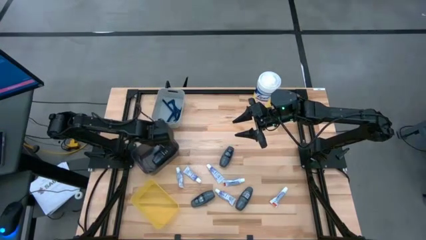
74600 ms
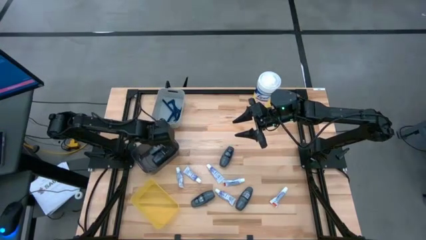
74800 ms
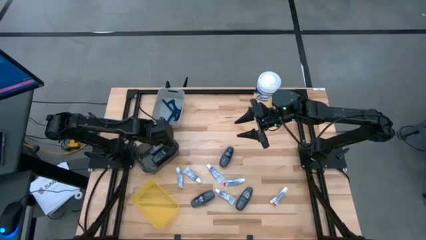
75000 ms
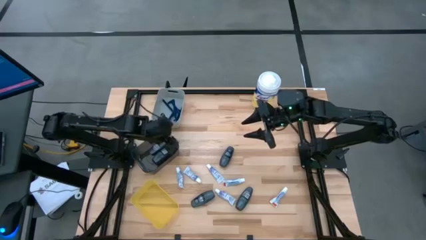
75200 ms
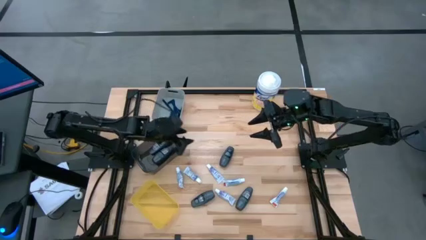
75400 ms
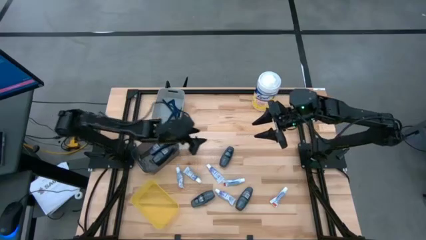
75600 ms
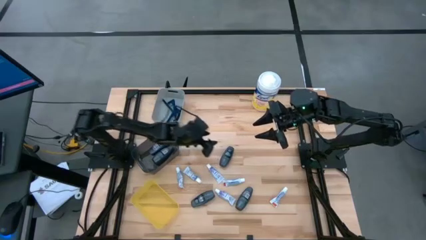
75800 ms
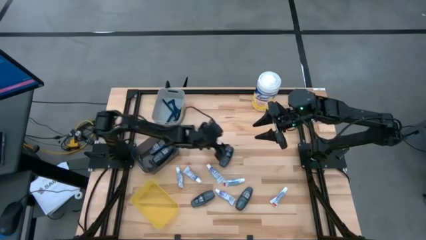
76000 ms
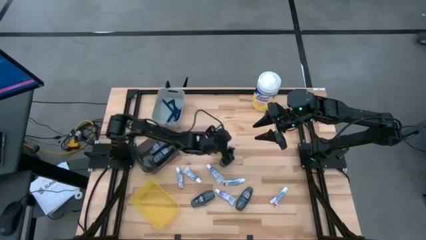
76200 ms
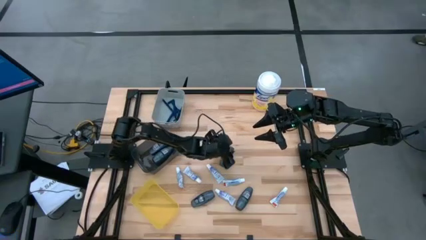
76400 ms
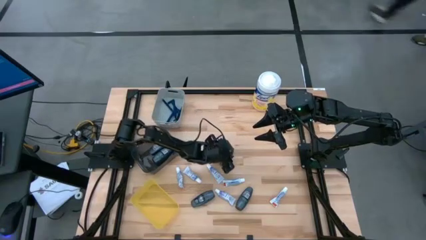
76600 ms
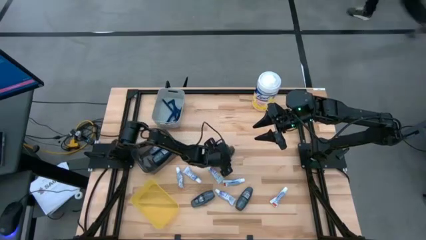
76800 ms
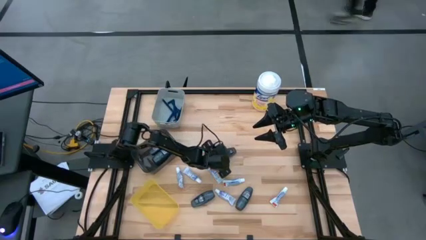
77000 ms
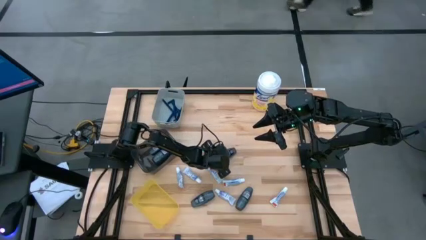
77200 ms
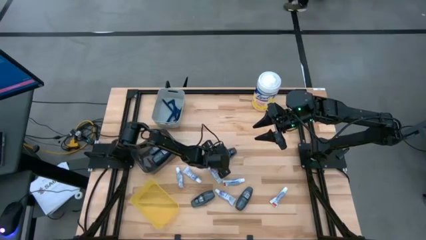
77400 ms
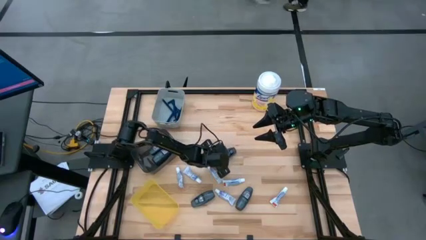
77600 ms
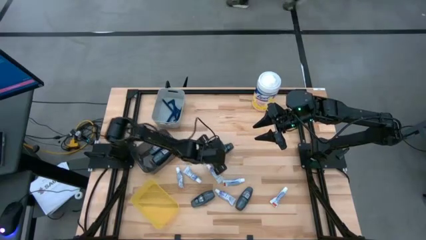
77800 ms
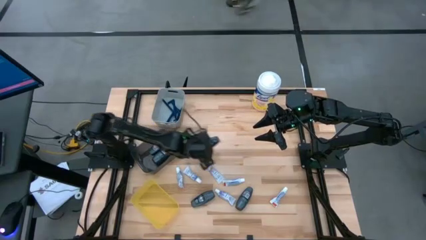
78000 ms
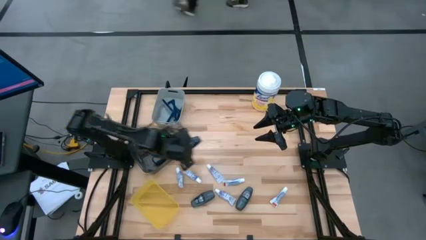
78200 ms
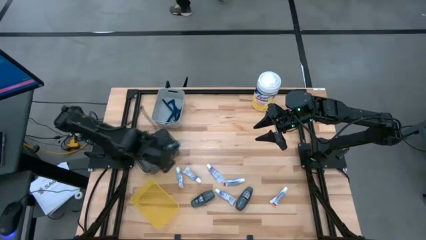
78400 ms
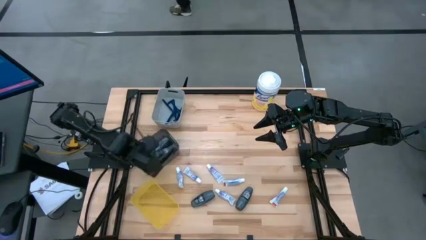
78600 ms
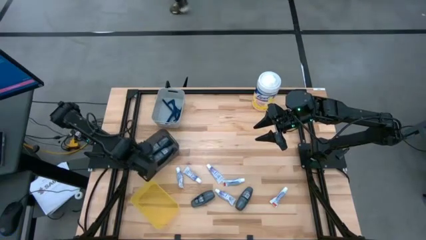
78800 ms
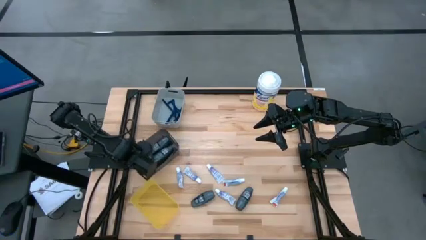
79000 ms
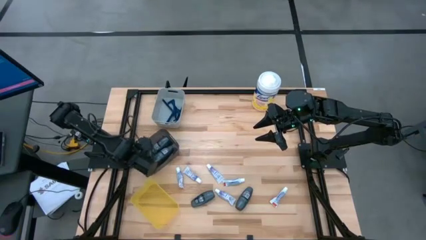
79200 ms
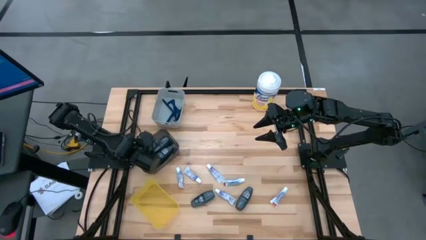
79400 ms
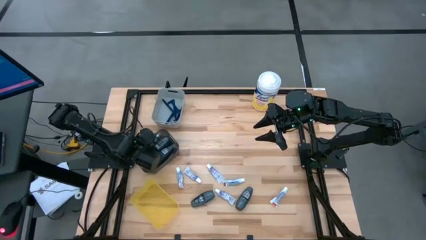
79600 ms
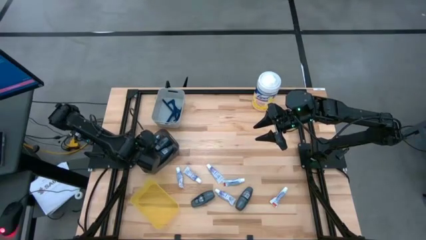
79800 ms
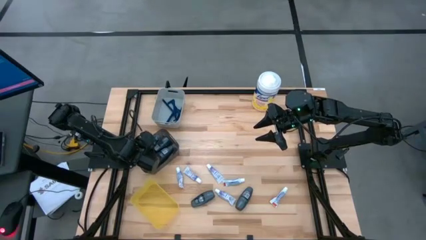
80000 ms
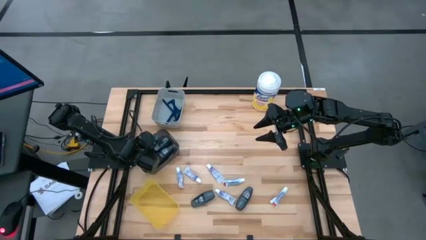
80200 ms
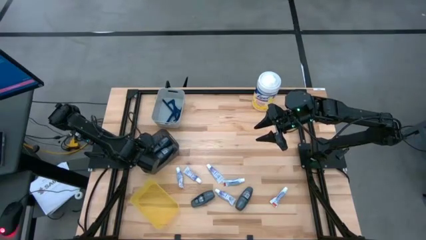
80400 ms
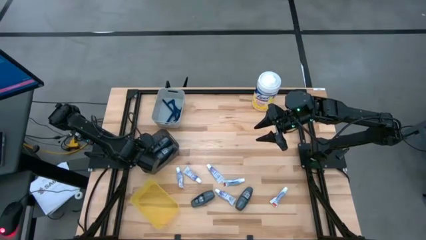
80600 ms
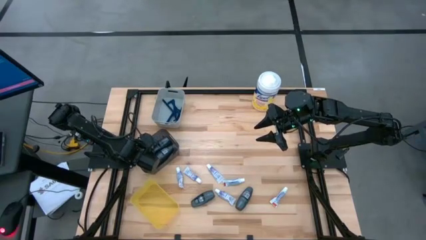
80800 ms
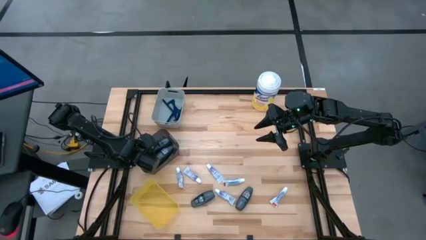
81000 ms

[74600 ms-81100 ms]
Task: Pick & Place Travel size toiletries
Put the deodorant into the black bin

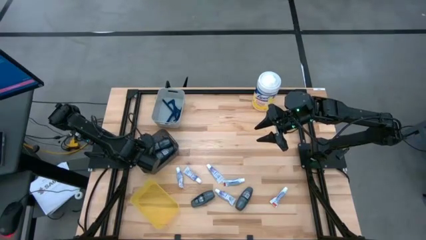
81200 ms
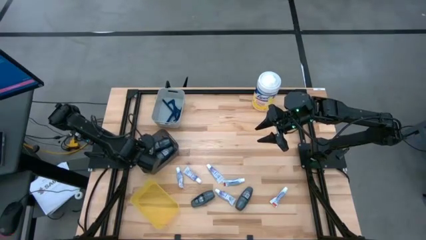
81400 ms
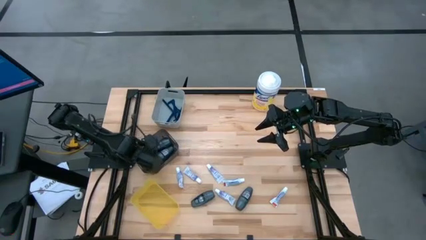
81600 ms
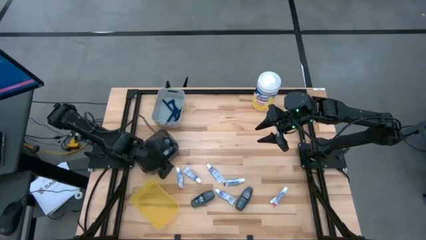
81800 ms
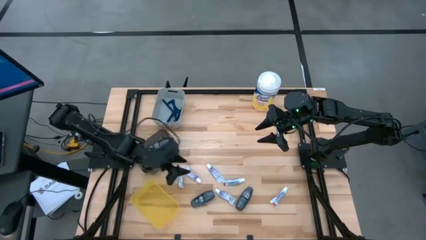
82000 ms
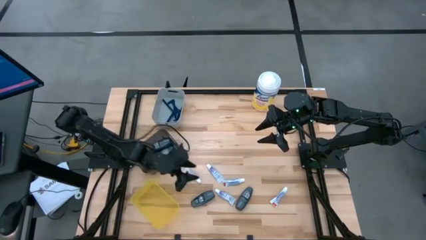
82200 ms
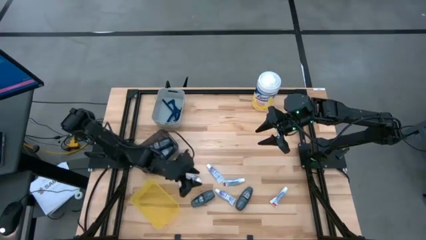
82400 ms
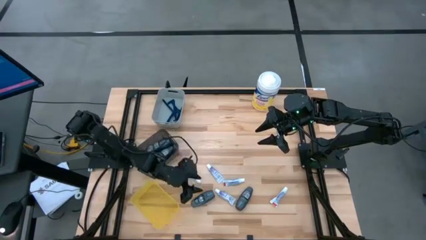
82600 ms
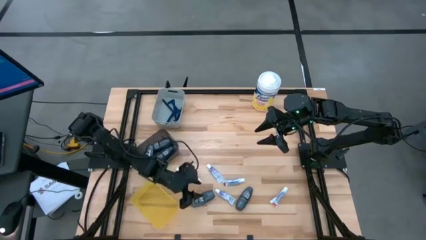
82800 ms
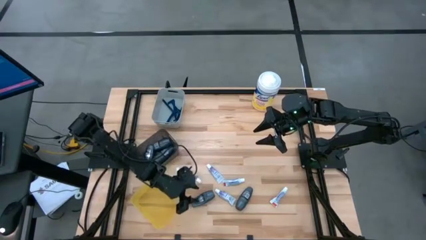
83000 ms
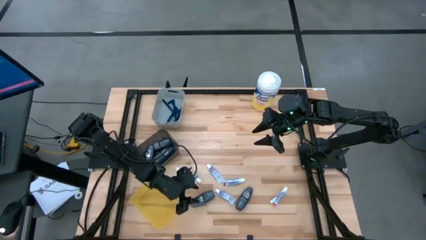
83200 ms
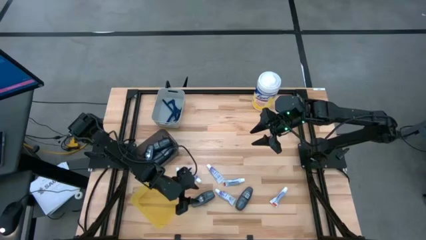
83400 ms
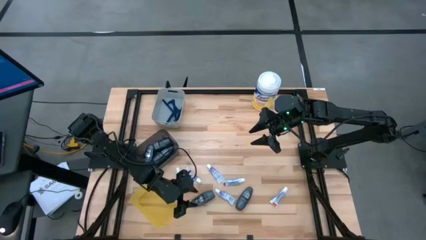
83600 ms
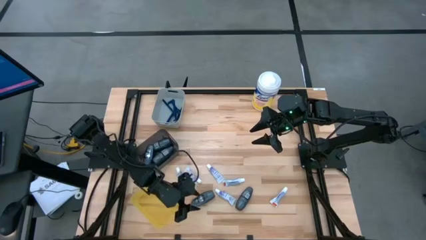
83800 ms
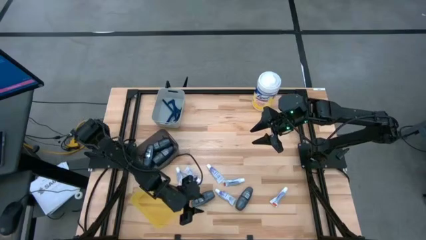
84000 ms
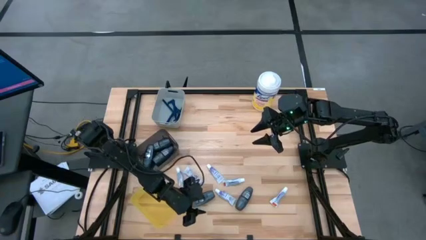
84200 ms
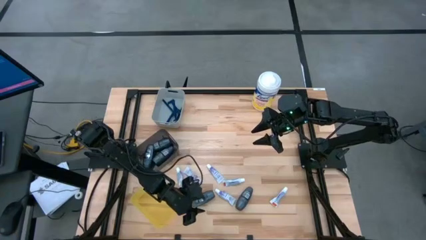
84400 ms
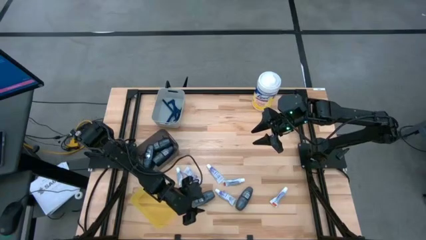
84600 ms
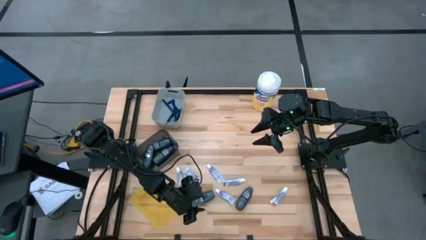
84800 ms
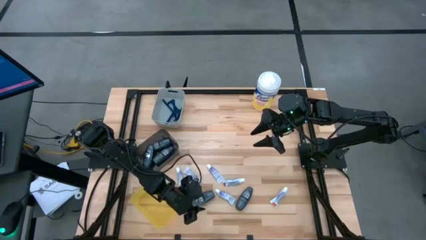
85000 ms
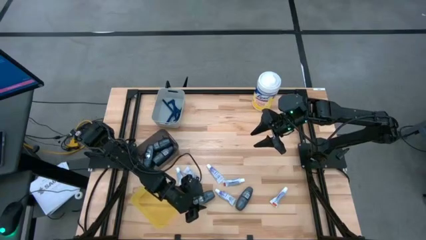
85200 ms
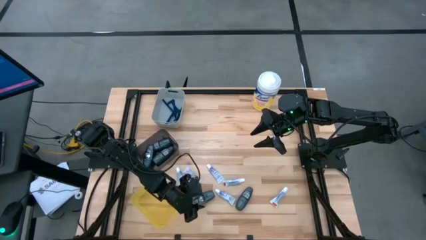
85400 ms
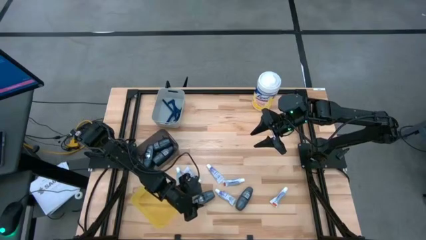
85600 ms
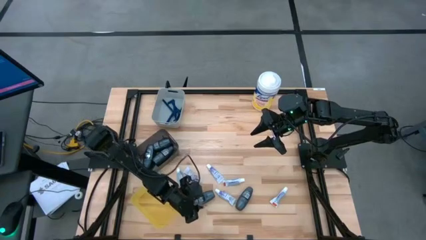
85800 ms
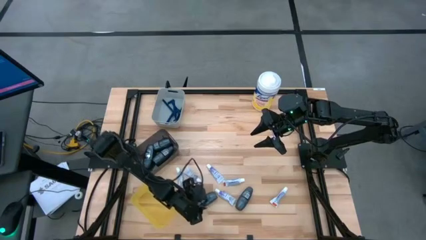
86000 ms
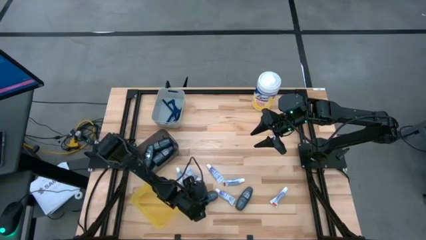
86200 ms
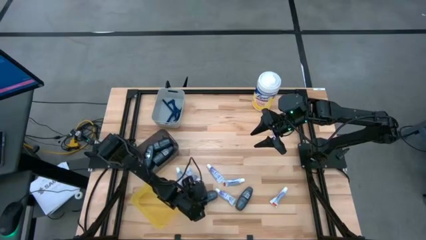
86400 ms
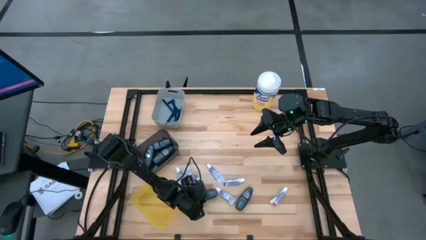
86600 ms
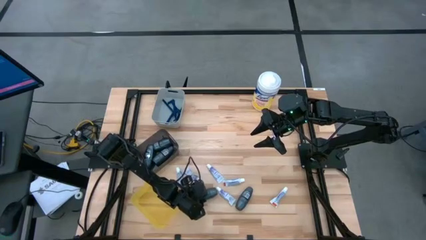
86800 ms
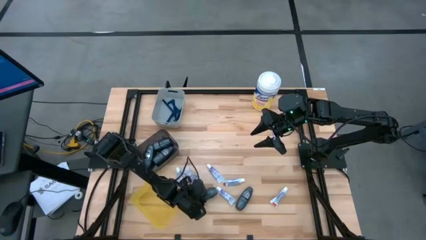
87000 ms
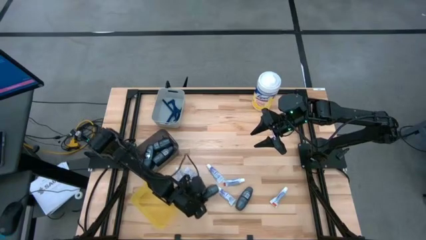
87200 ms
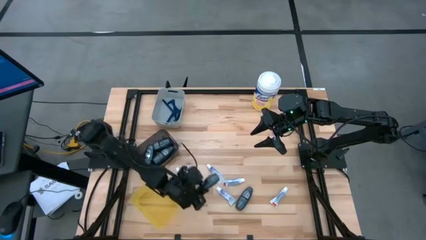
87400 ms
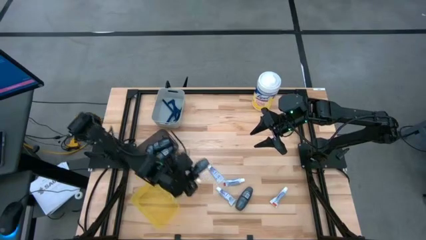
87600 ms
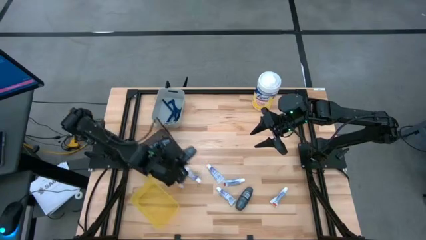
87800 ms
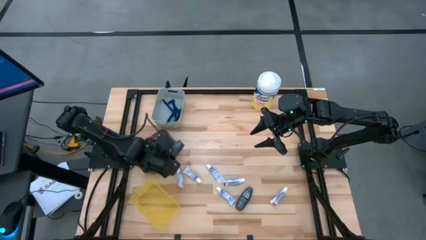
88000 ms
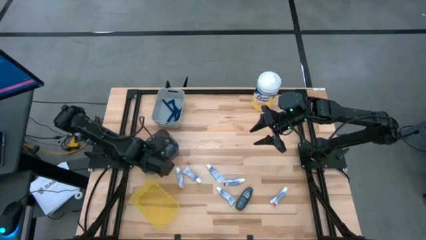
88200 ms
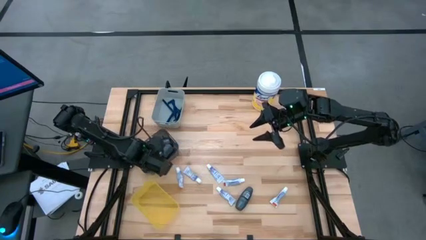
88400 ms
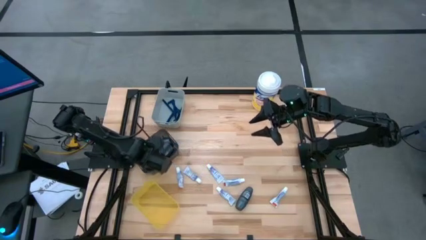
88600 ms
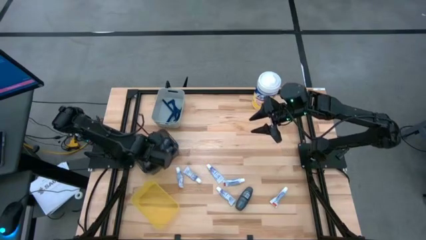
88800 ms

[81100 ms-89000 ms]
Put the deodorant into the black bin

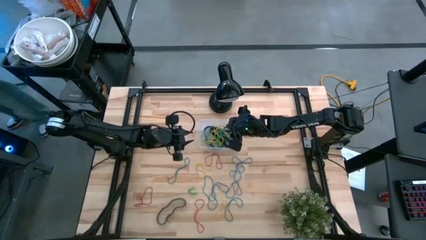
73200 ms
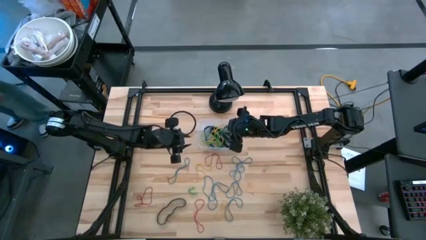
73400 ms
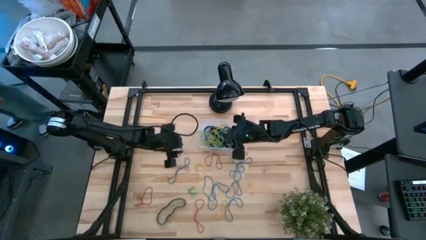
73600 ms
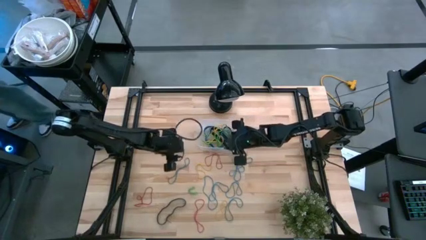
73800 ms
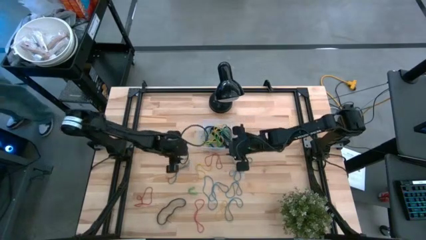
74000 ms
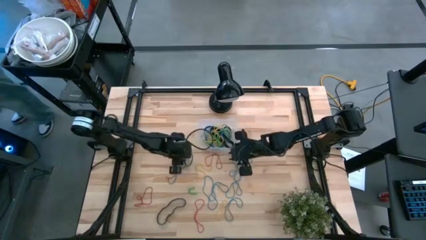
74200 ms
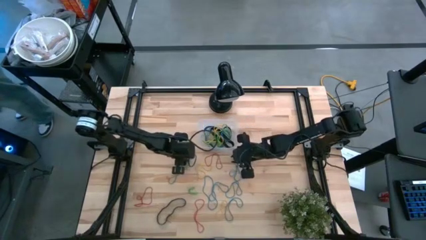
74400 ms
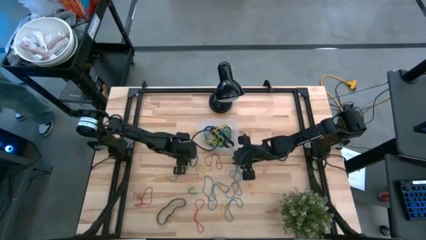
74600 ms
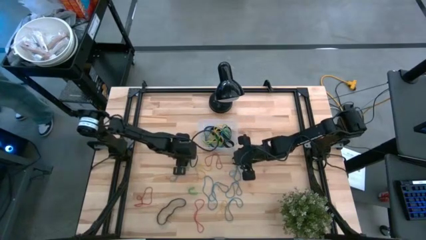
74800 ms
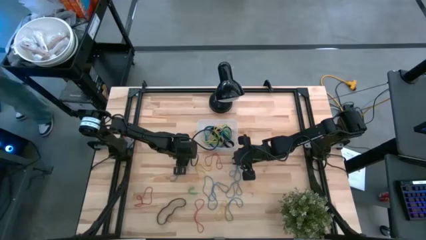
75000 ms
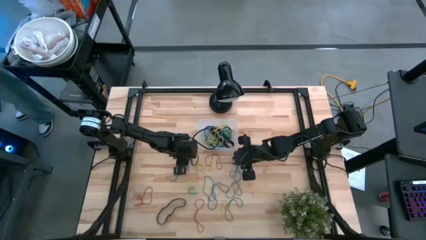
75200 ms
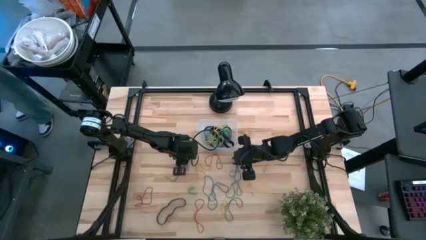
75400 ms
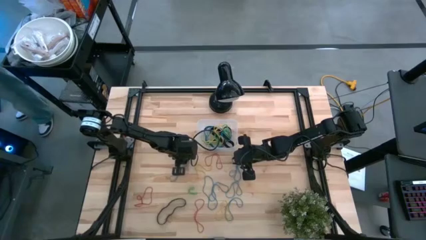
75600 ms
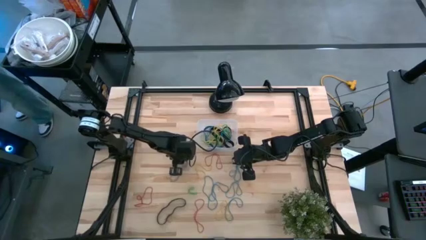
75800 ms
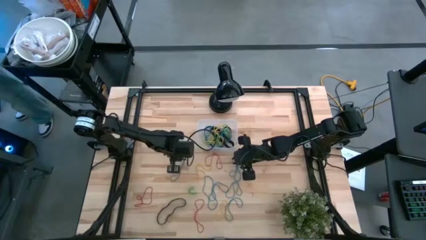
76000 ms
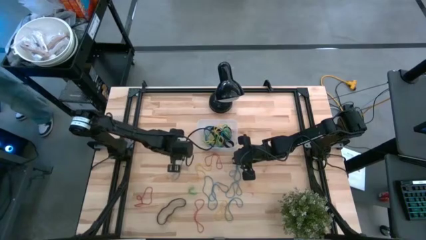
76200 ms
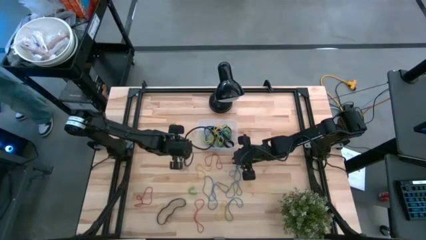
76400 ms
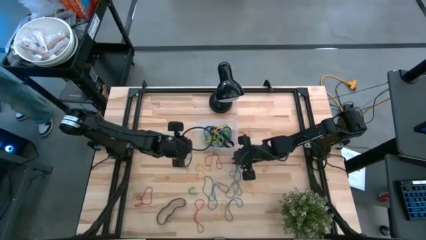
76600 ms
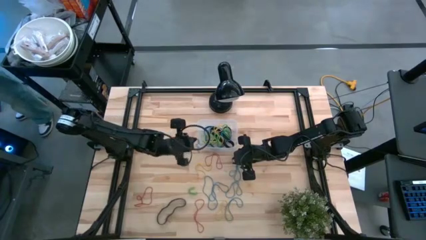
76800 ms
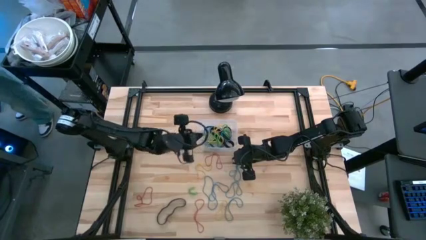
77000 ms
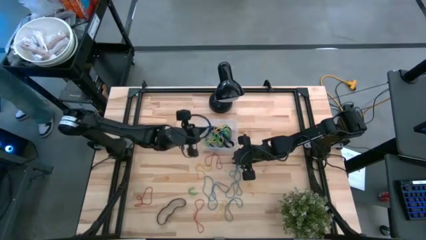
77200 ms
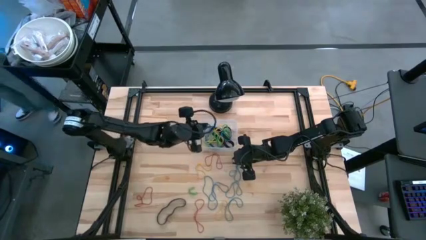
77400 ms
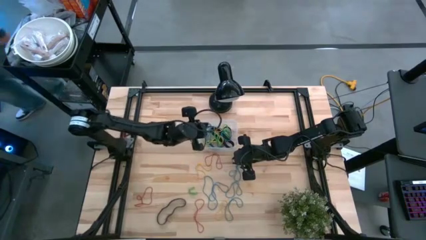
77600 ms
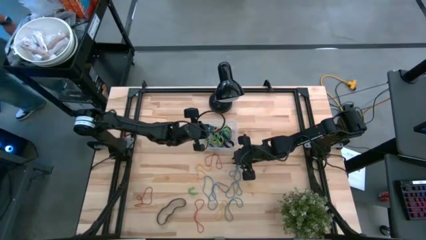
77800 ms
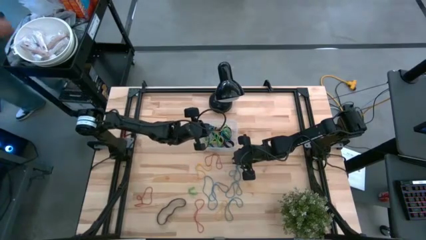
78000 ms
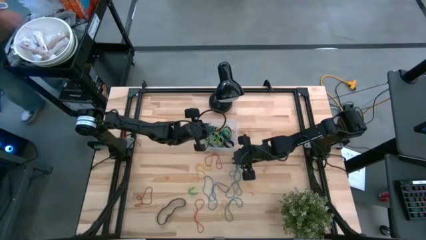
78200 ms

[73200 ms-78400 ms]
Task: Pick and place rubber bands into bin
Put the blue rubber band into the transparent bin
